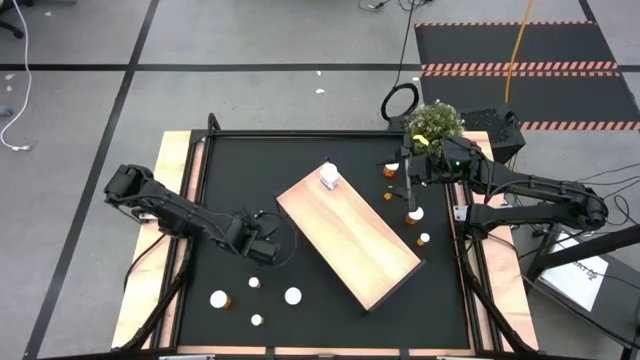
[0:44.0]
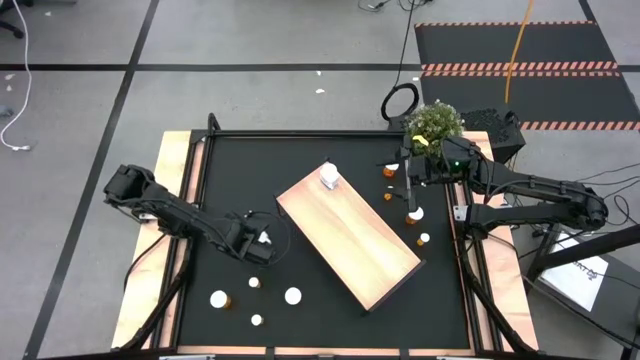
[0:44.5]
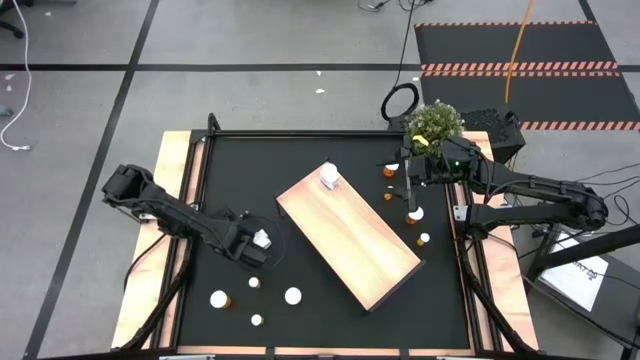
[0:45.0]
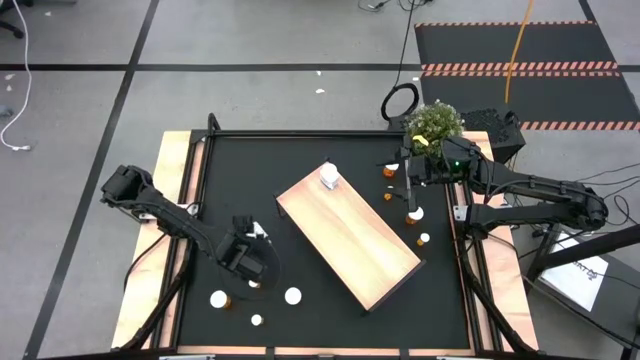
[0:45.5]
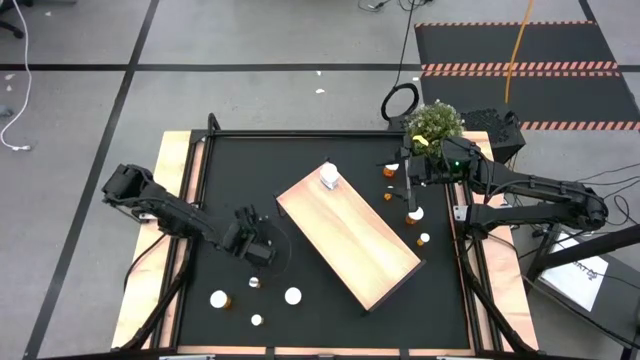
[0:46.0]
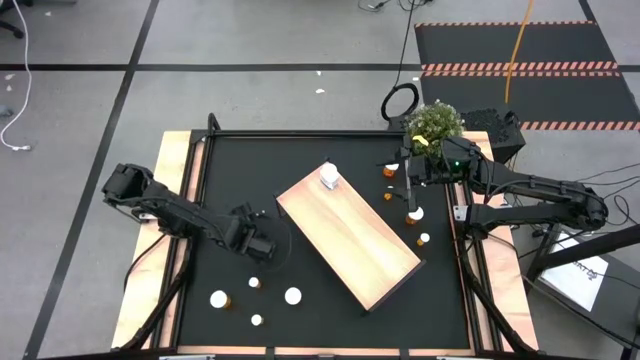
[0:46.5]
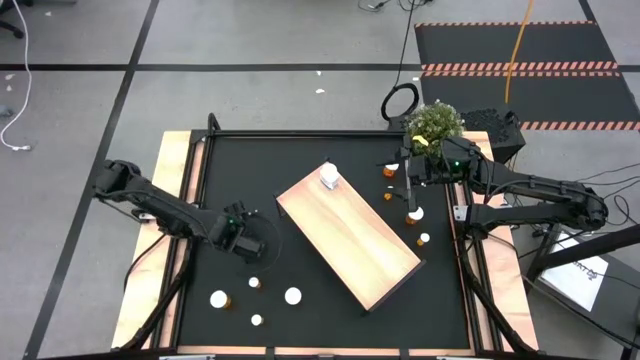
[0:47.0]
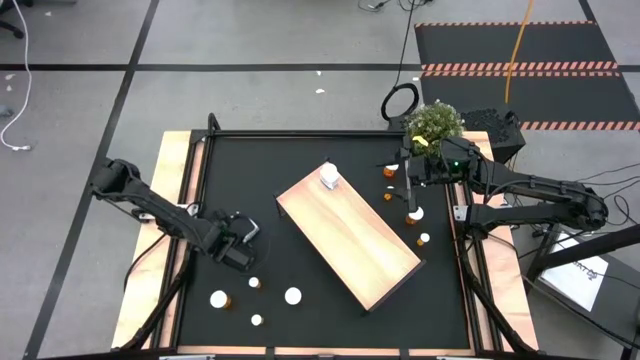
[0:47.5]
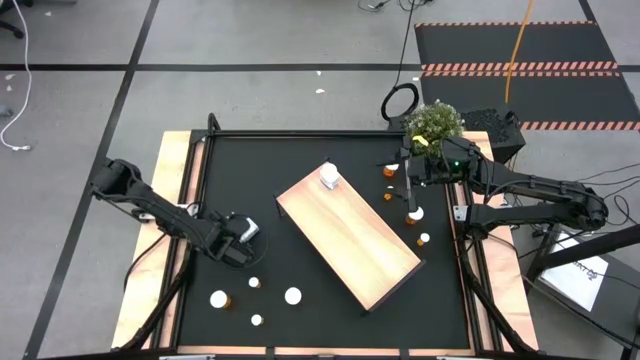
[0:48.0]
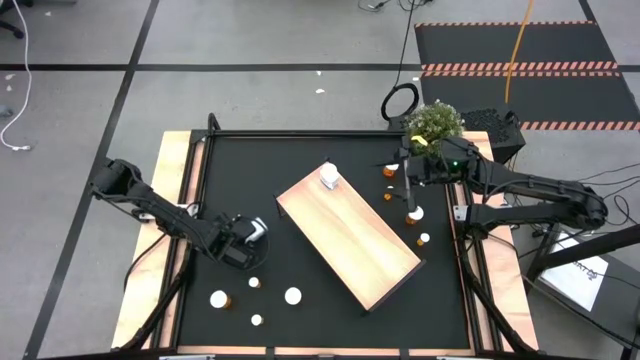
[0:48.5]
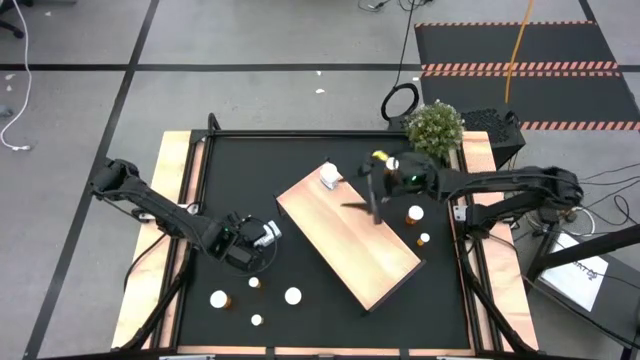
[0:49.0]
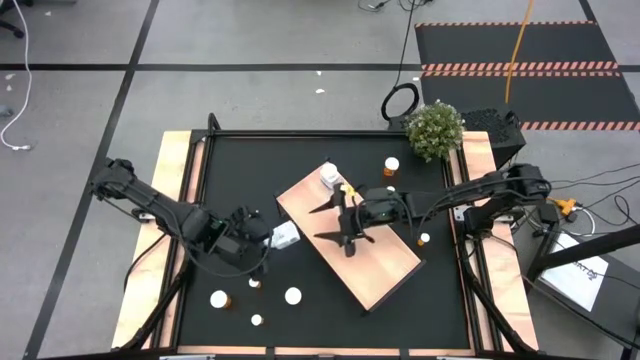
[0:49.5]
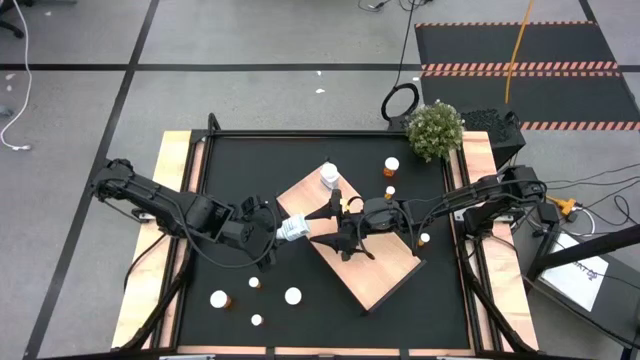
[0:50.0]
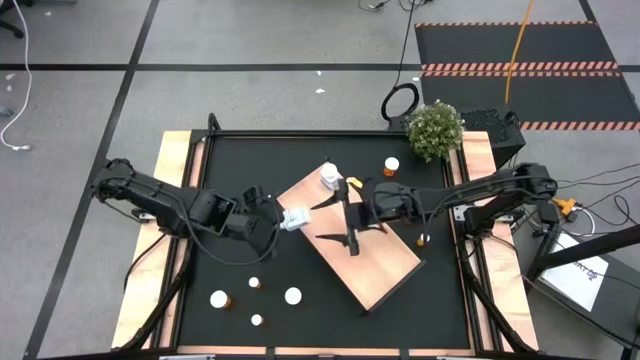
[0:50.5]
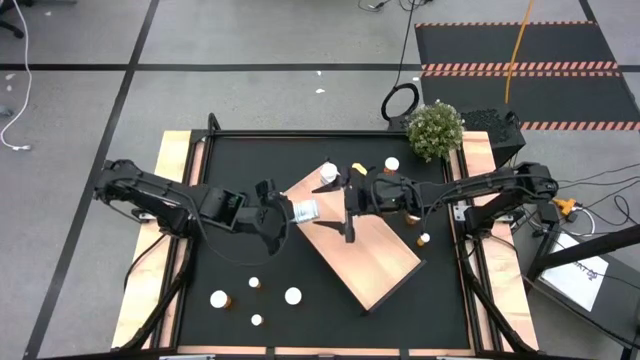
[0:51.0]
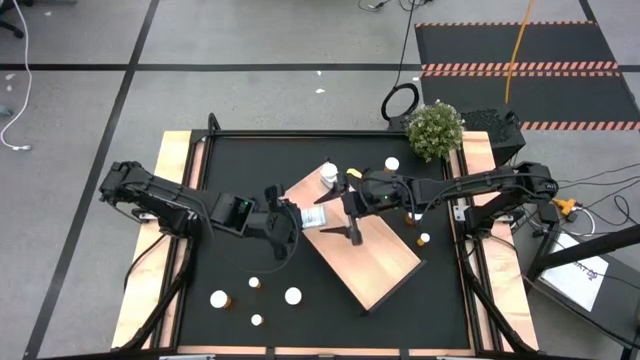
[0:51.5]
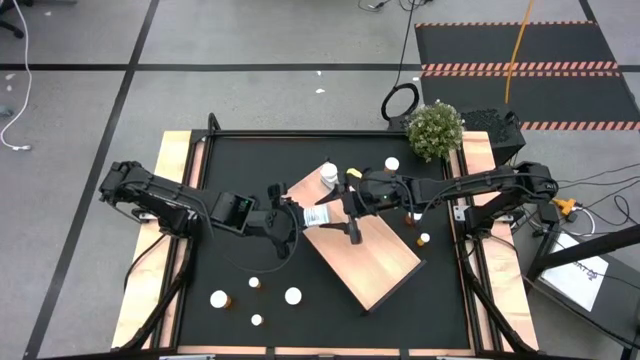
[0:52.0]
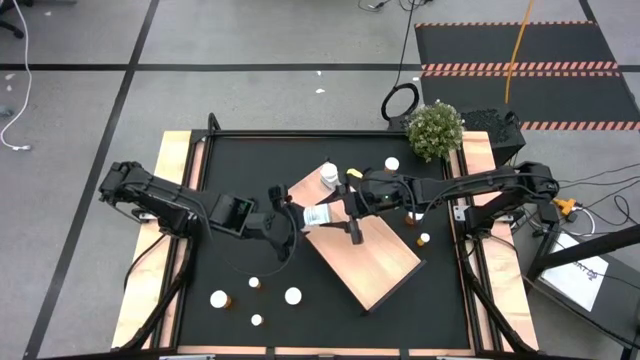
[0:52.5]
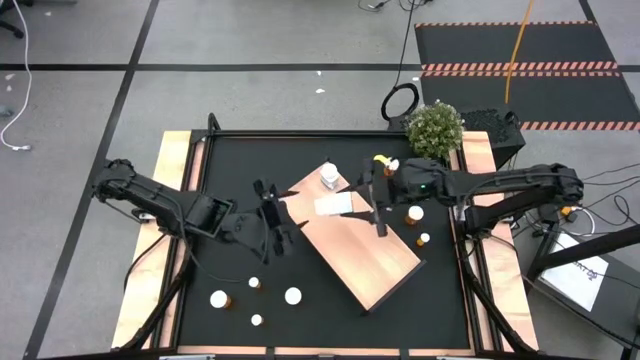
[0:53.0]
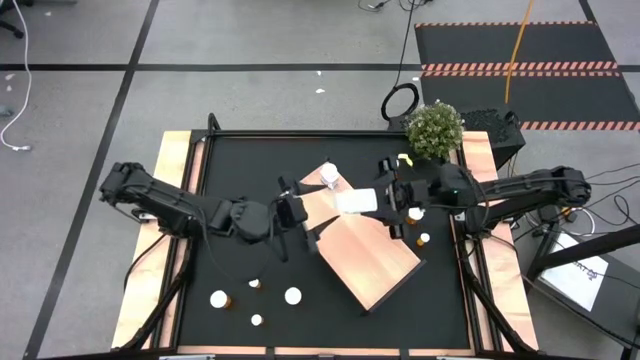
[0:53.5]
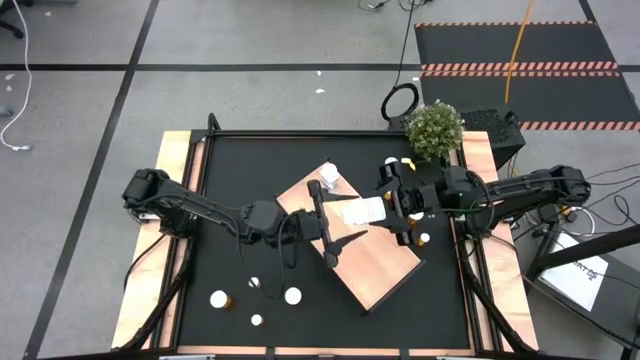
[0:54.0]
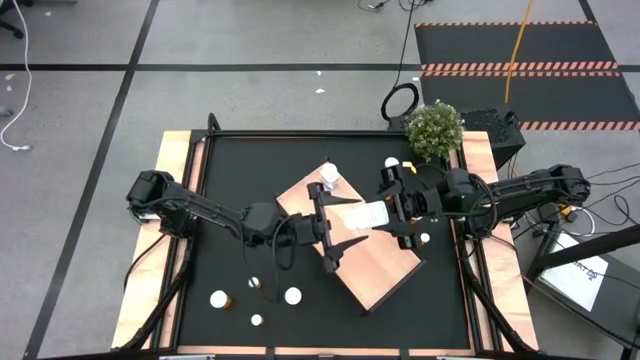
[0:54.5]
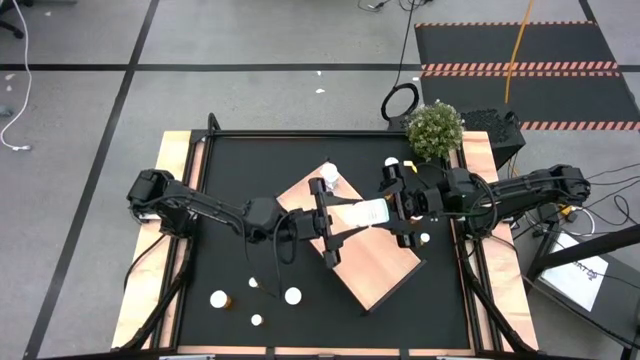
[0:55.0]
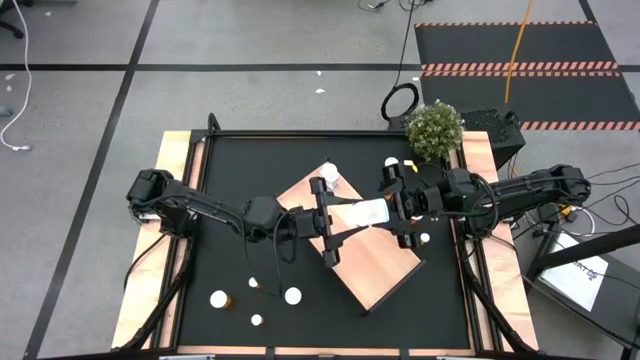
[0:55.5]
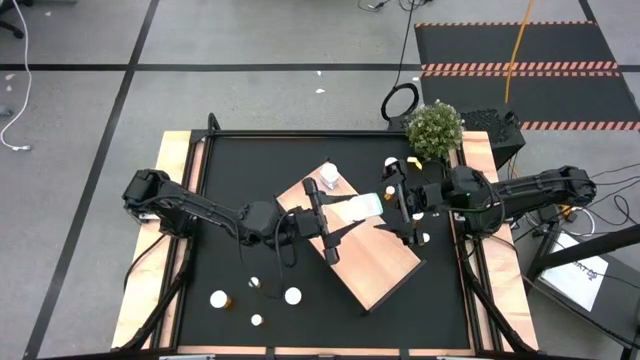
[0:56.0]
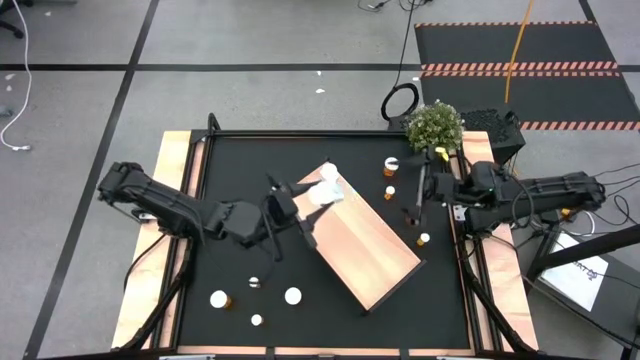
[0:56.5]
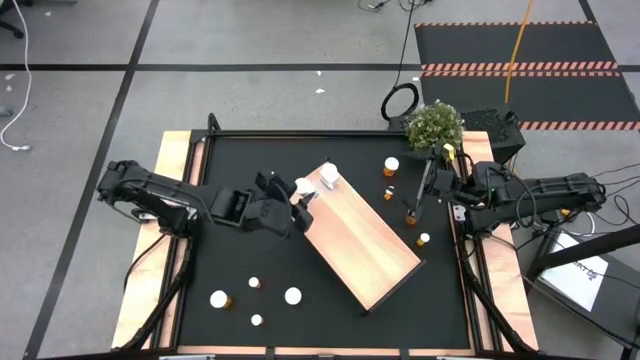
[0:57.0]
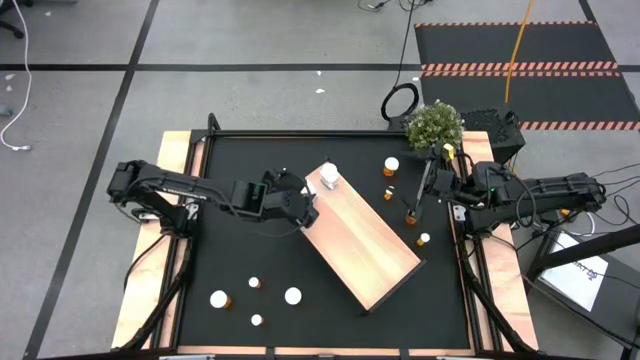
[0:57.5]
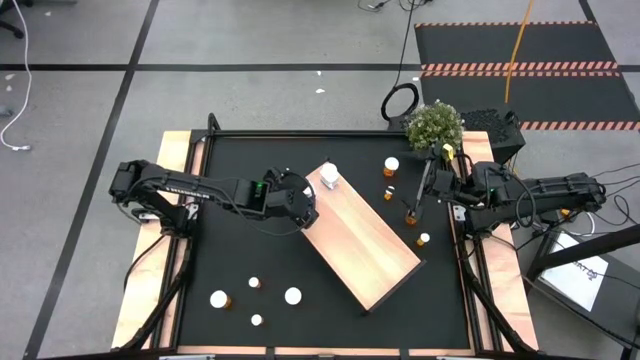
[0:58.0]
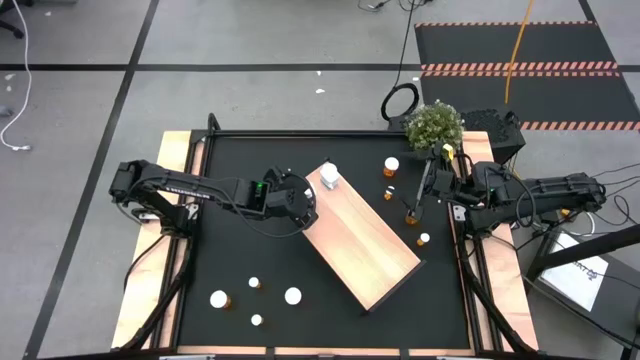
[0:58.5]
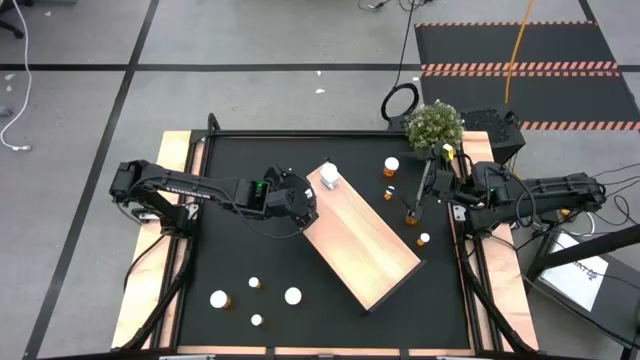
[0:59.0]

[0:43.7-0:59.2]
Task: Pick and place medicine bottles onto shelf by color
Put the white pill bottle on the shelf aligned with the other white pill bottle

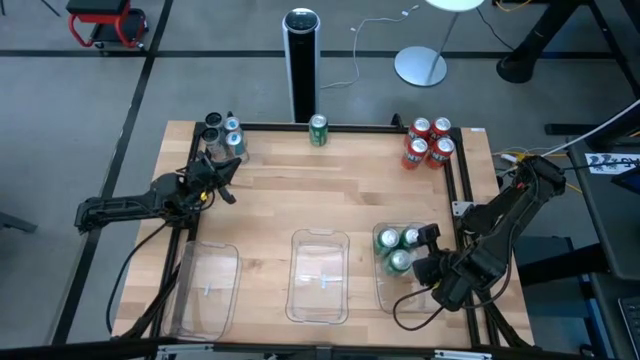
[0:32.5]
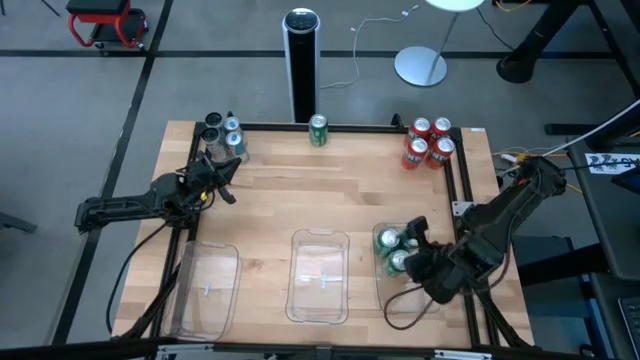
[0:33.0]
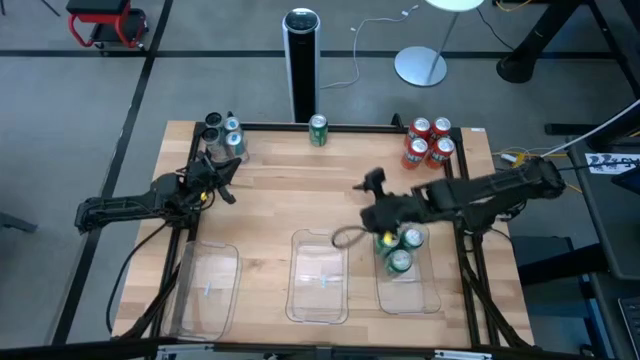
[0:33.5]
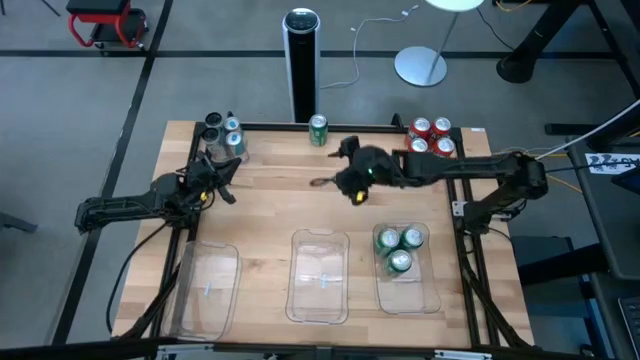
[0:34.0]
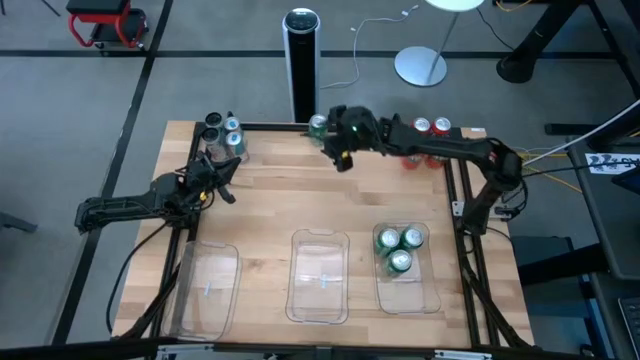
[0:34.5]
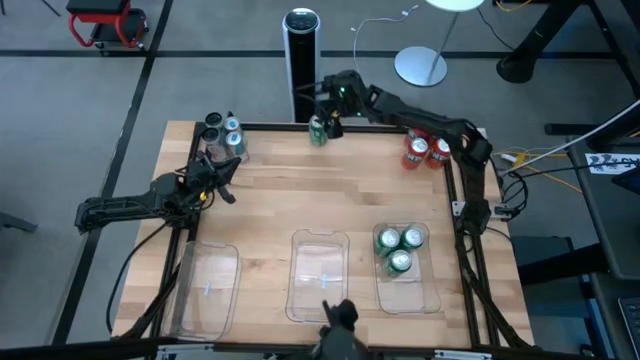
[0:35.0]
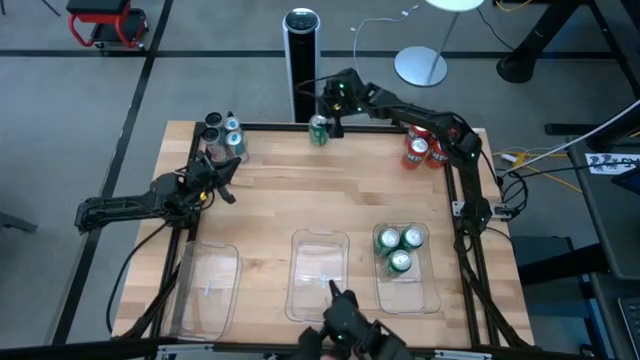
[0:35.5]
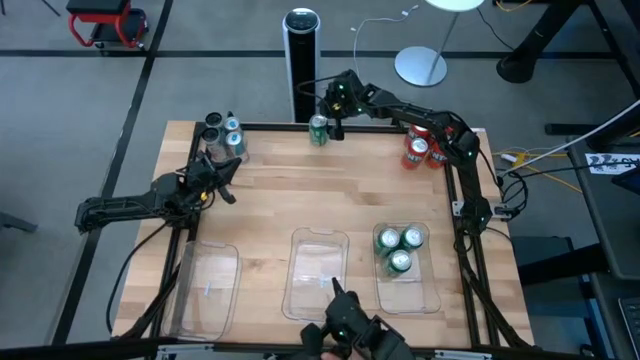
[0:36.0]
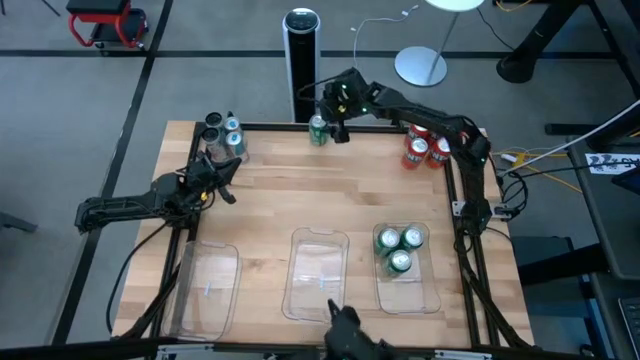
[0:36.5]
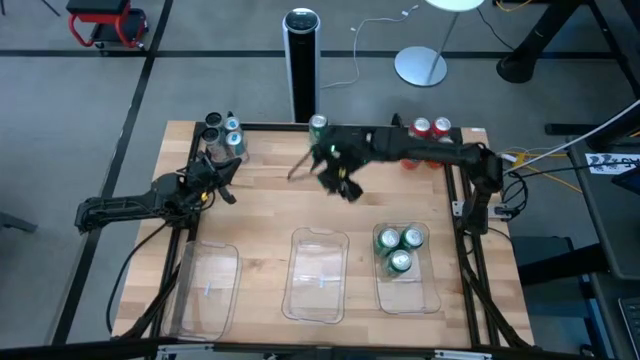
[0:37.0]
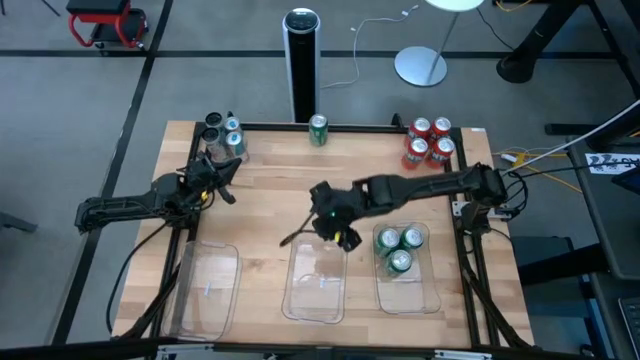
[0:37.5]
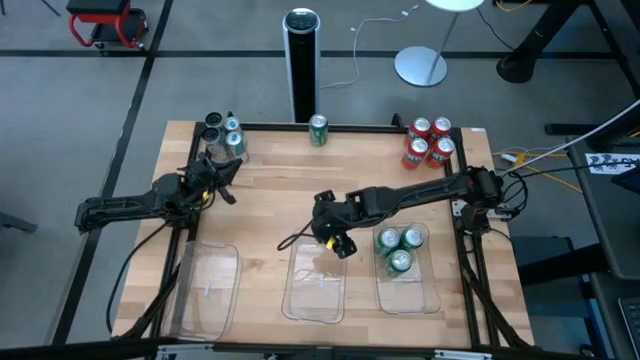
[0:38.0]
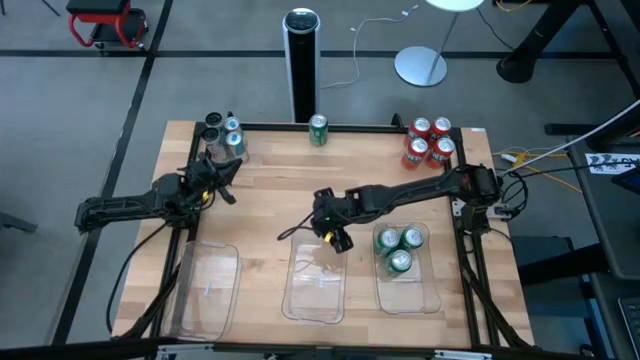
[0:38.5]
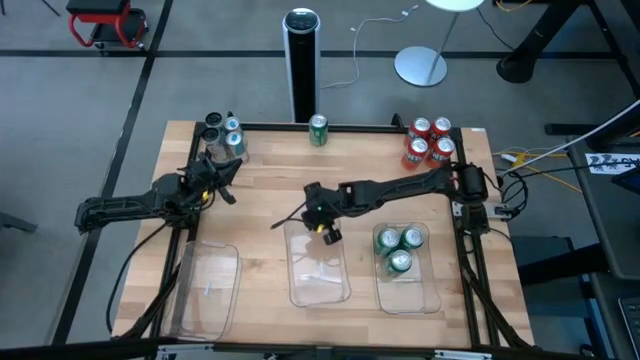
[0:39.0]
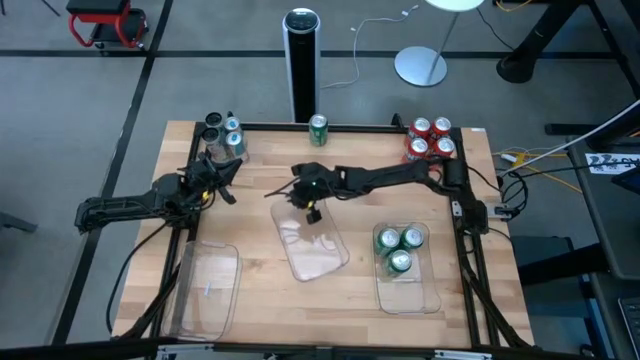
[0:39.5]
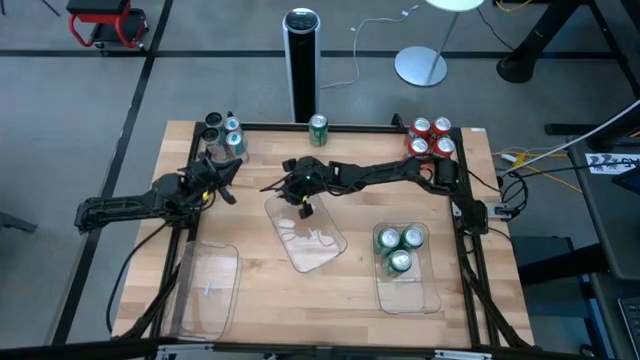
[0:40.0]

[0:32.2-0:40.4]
Task: Sort soda cans
Adjust the middle transparent bin
